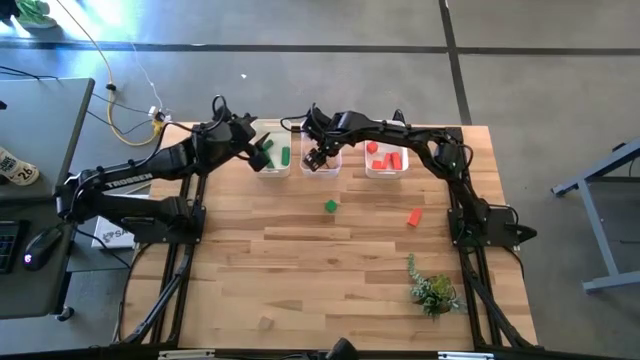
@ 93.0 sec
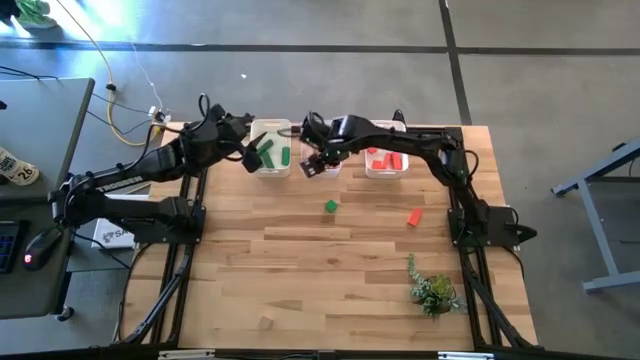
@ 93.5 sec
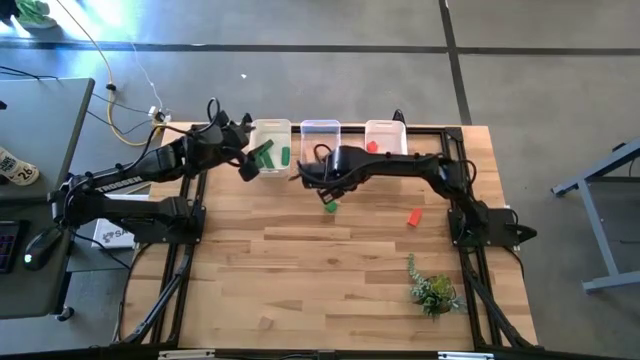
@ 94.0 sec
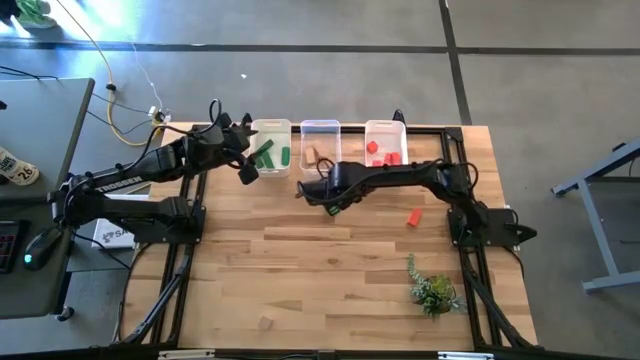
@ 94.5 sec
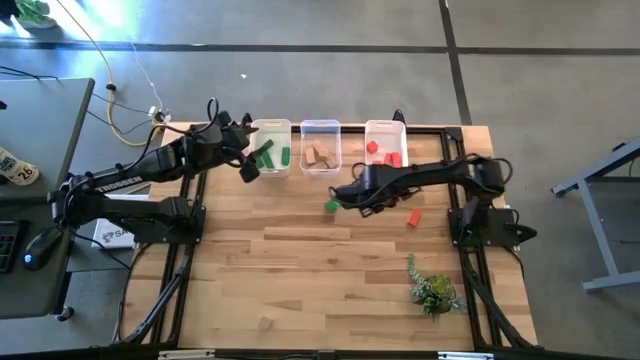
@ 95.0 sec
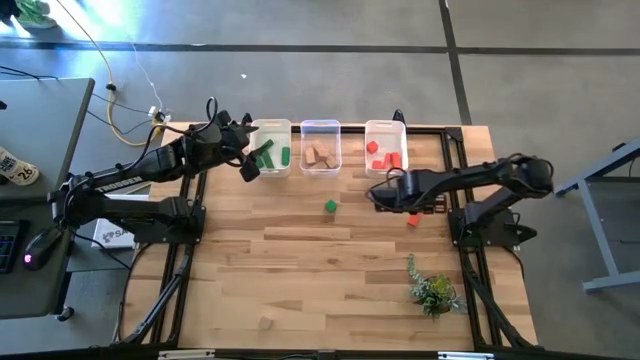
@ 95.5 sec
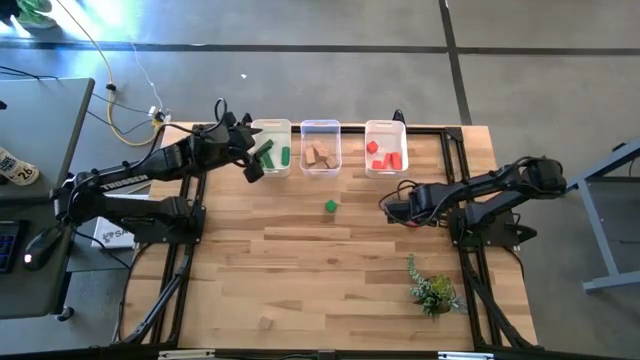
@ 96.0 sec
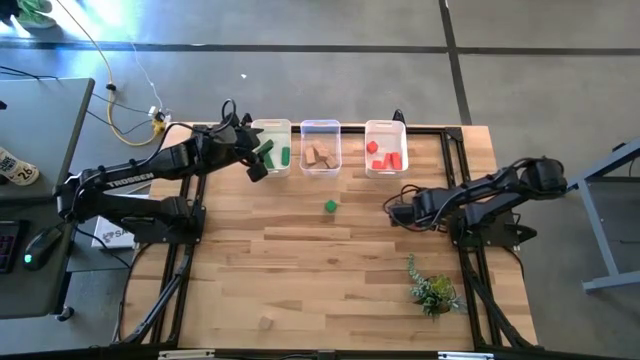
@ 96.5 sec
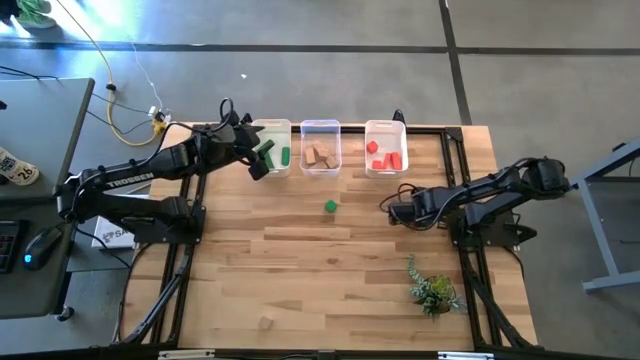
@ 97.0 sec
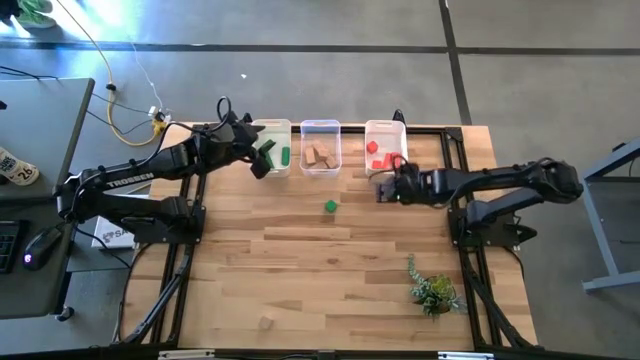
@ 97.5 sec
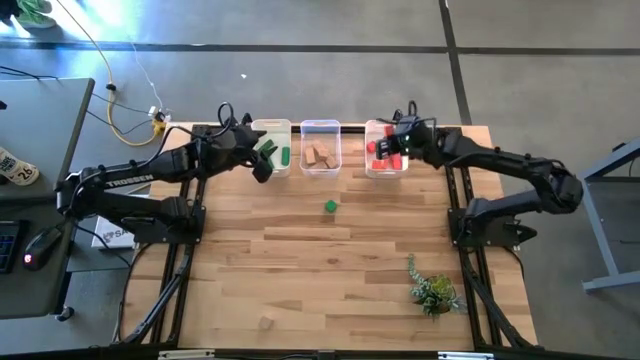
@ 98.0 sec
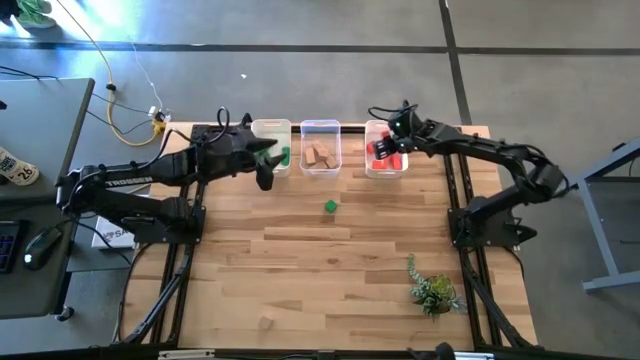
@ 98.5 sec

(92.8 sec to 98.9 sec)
Task: Sort & place blocks by color
Put the orange block into the right white bin

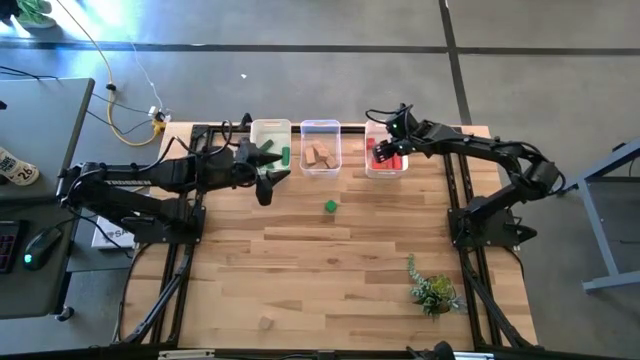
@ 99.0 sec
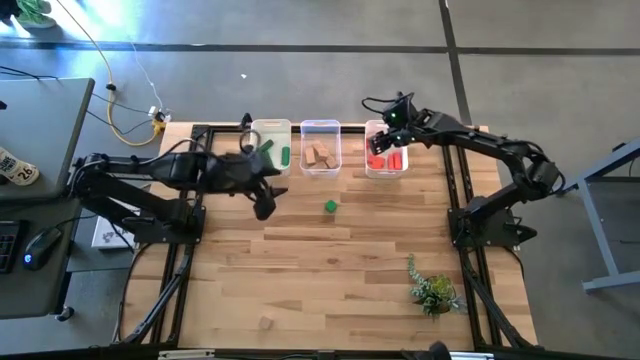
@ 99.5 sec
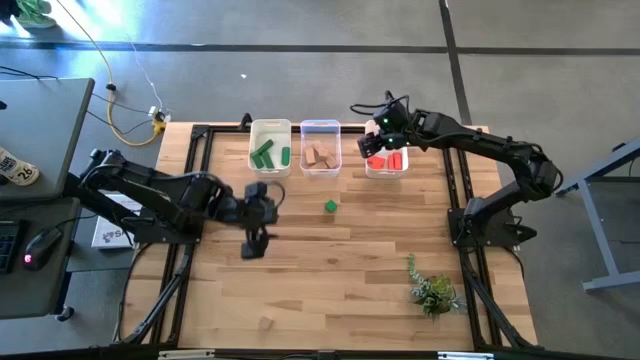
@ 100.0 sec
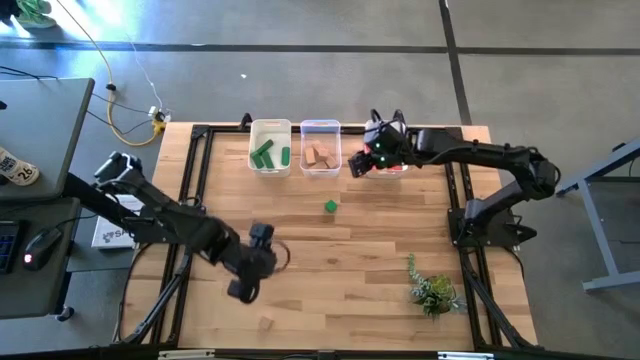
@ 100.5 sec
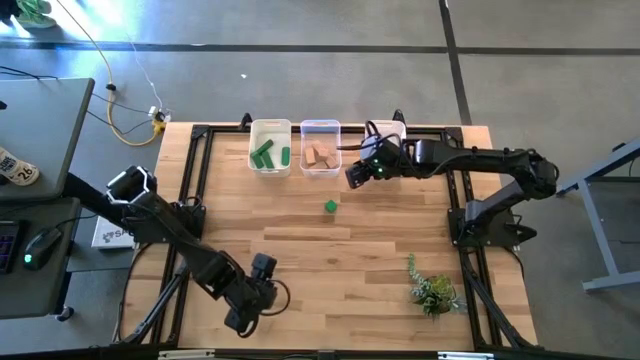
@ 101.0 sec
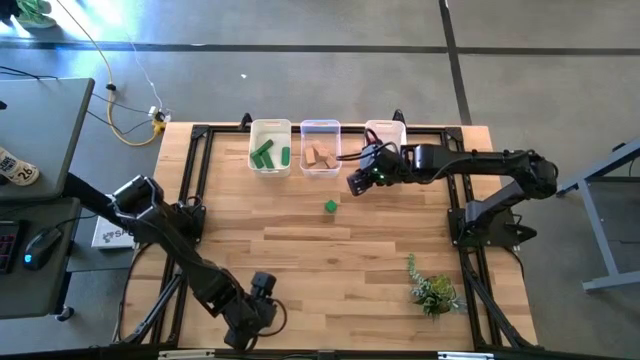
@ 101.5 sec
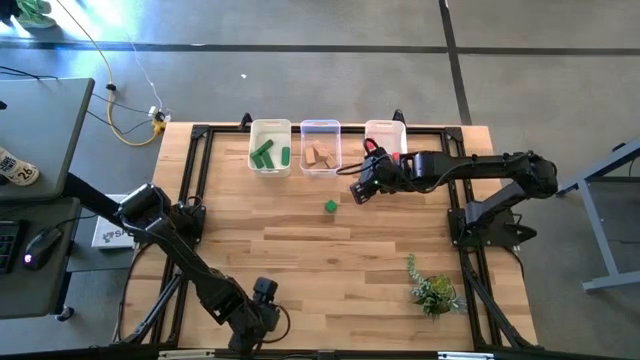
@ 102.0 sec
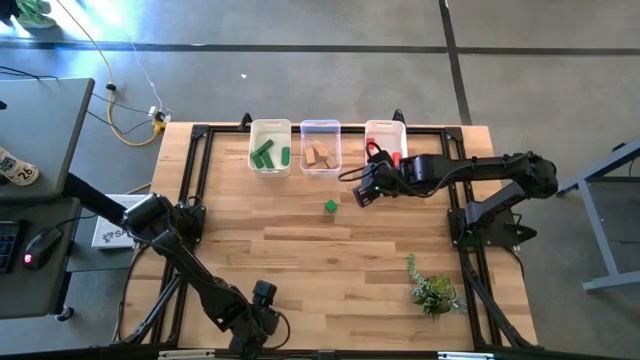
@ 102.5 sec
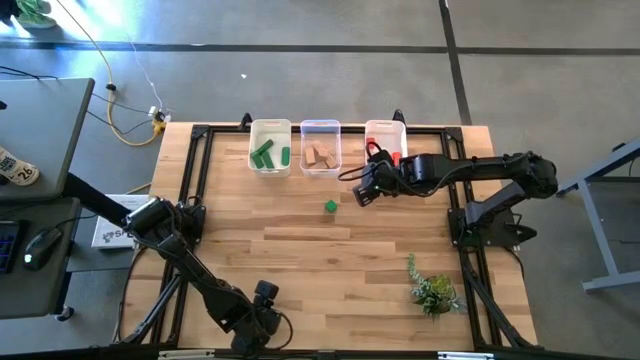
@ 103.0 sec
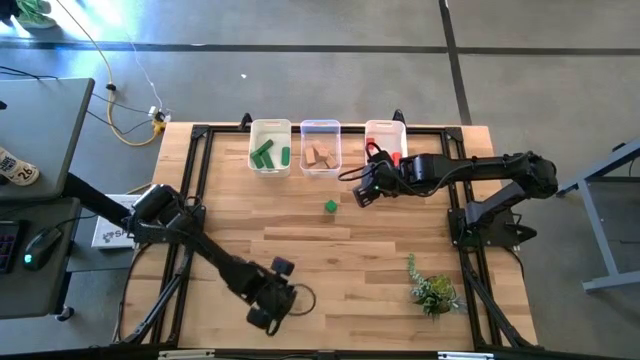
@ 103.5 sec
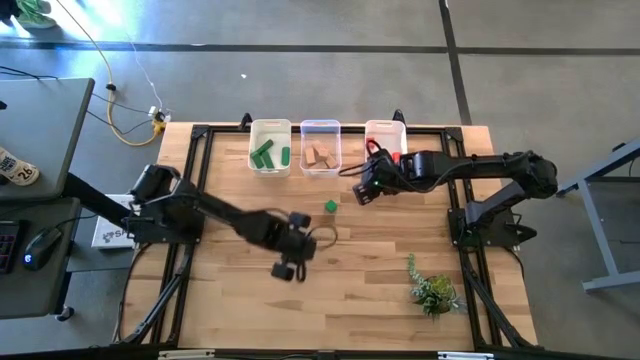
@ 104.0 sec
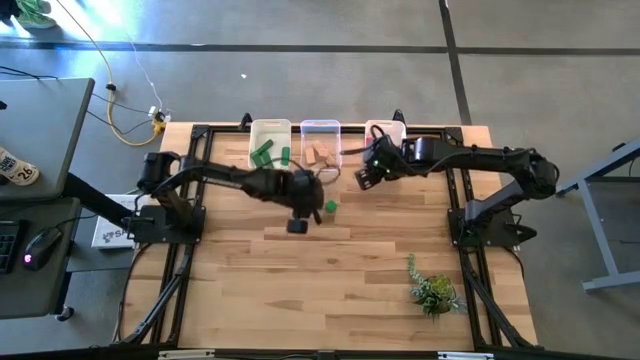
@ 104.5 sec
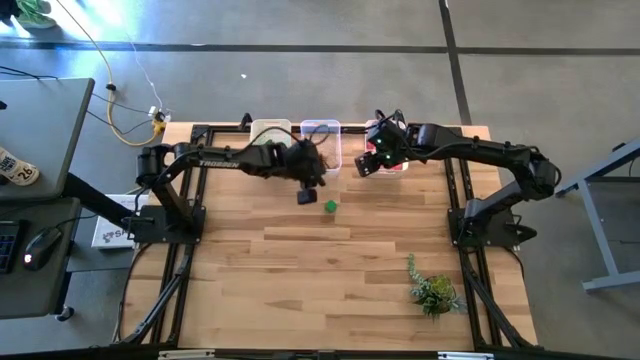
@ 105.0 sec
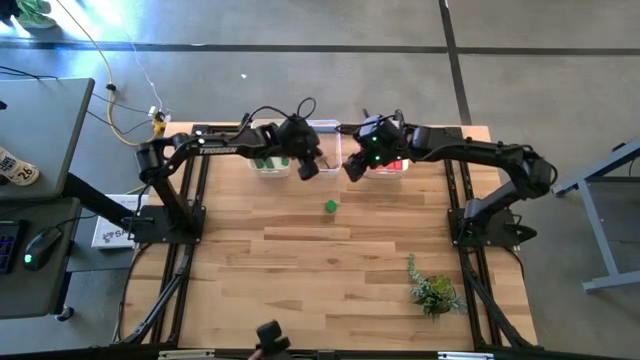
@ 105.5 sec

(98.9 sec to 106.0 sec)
Put the brown block into the transparent bin

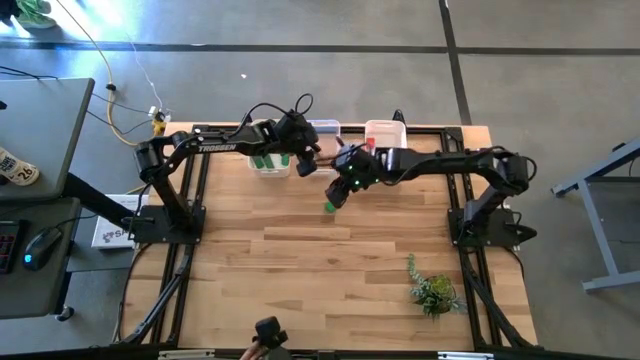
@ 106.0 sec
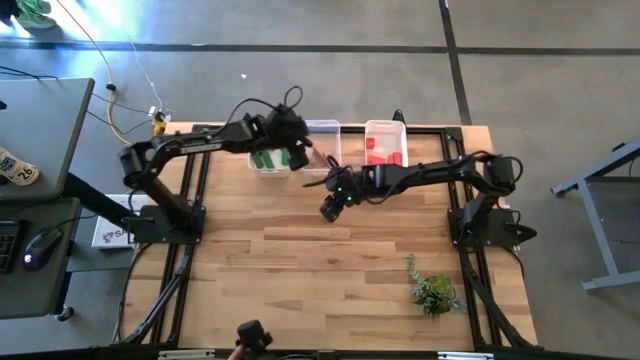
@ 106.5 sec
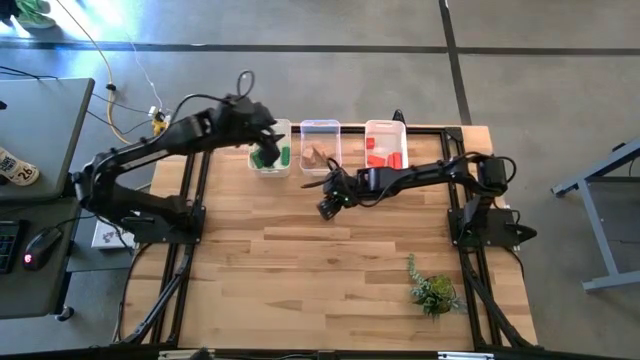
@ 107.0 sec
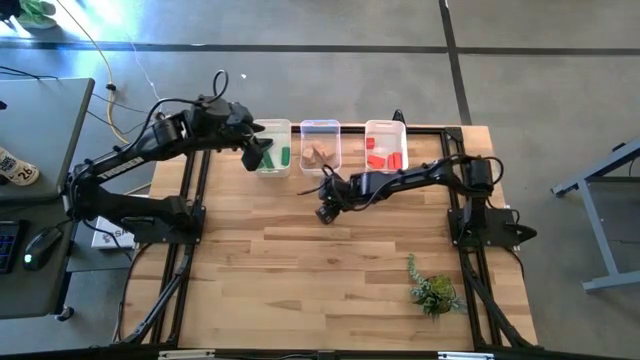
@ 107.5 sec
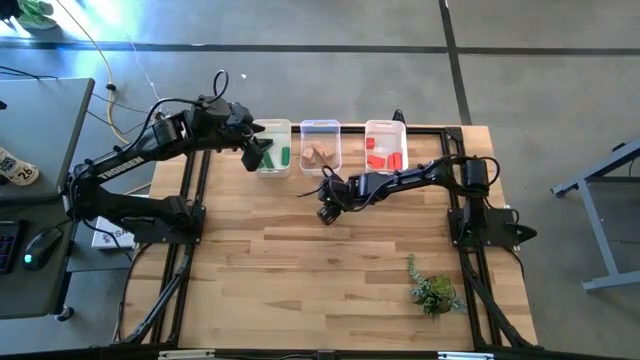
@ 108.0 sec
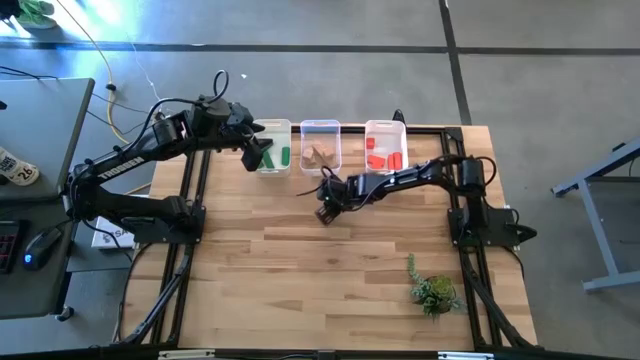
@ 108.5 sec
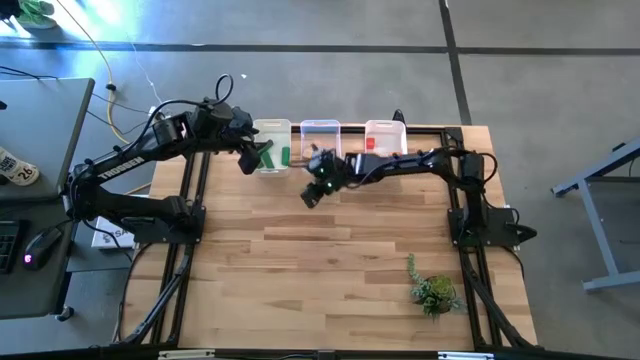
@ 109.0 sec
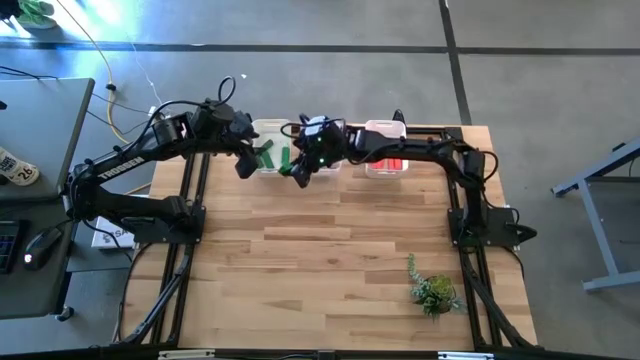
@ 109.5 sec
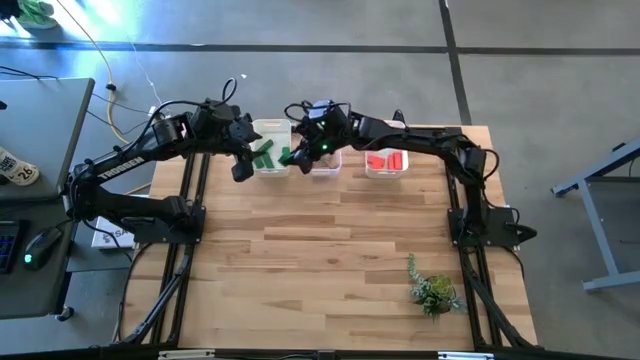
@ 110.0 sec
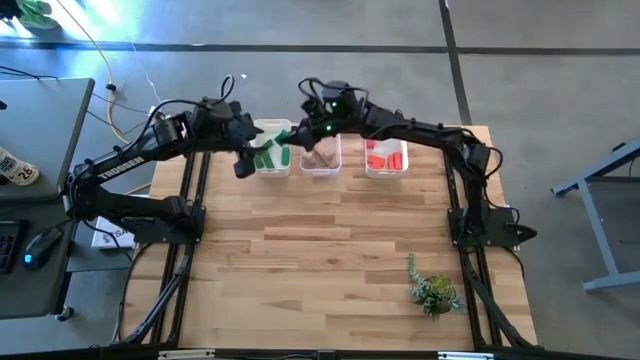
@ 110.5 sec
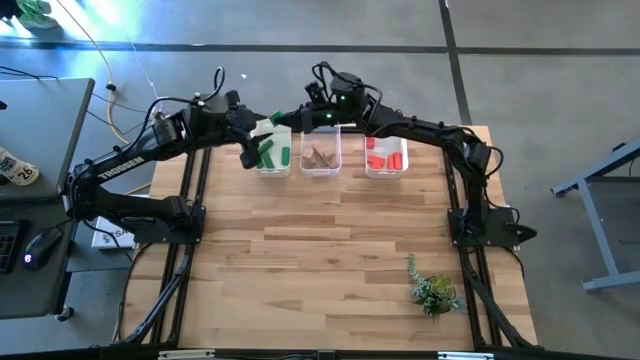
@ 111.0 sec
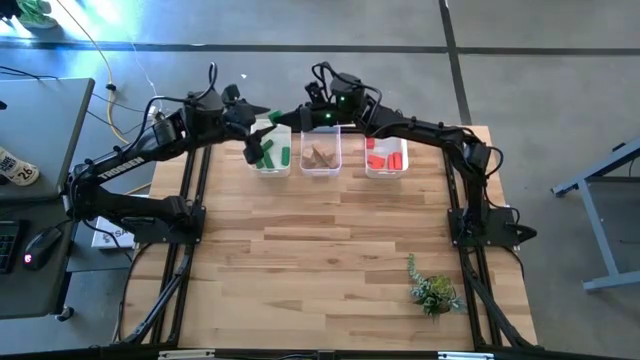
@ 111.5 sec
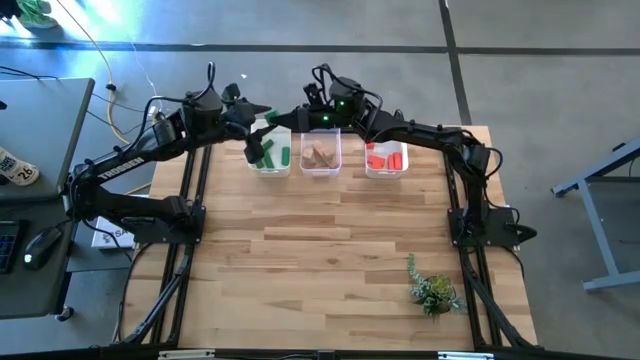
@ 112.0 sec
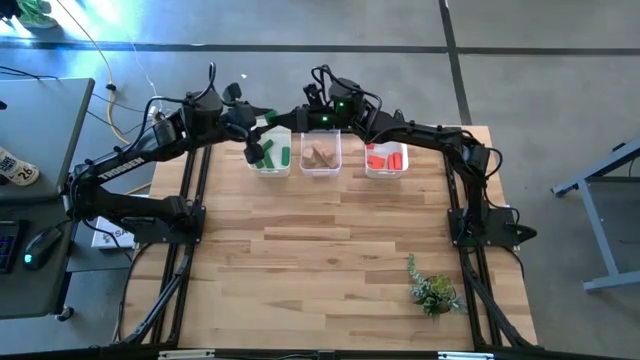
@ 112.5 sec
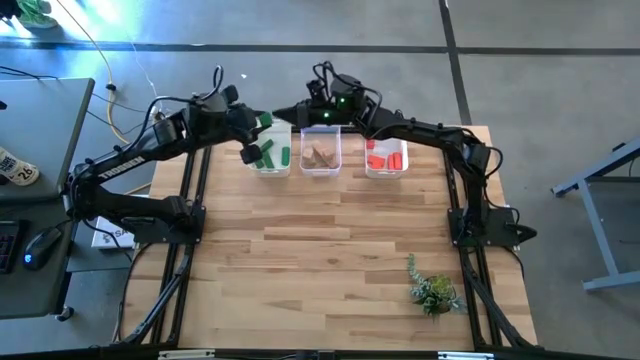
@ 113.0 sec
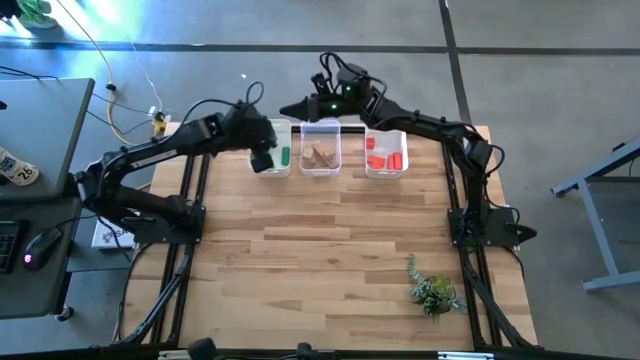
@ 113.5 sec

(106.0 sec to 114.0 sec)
Put the green block into the left white bin
